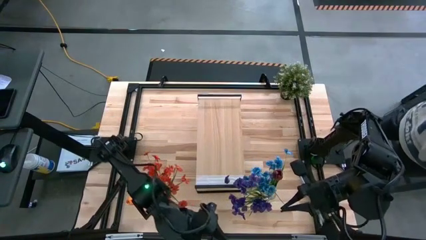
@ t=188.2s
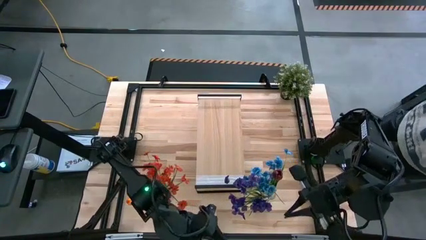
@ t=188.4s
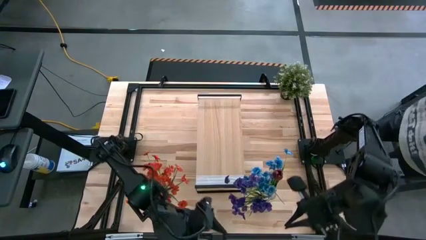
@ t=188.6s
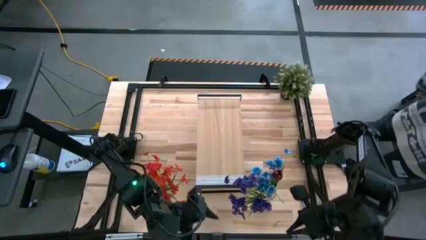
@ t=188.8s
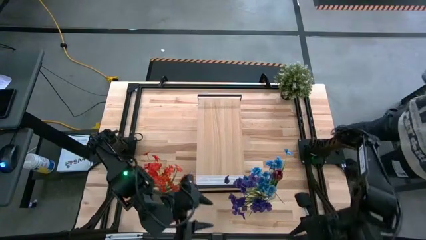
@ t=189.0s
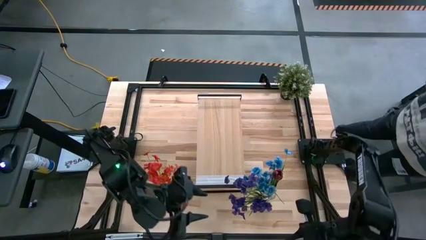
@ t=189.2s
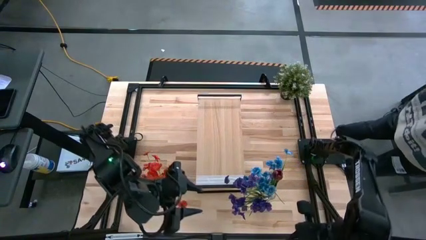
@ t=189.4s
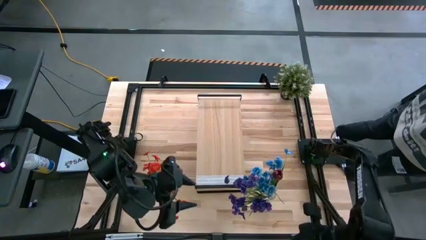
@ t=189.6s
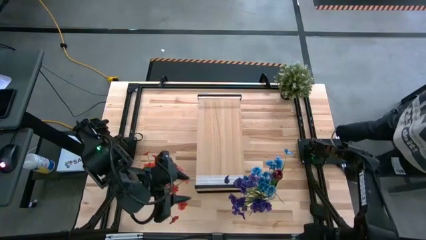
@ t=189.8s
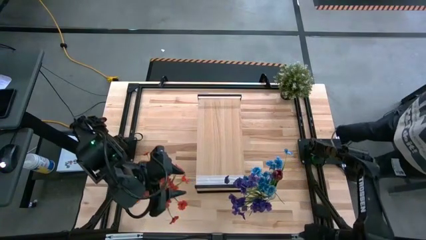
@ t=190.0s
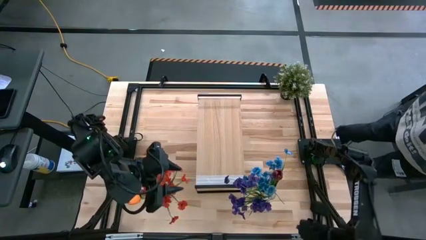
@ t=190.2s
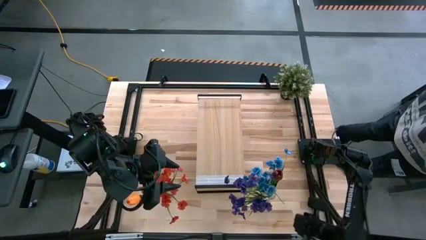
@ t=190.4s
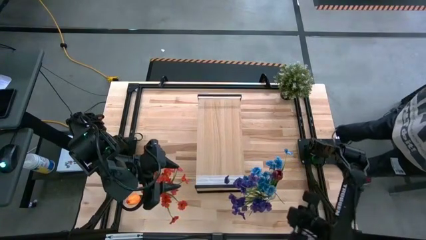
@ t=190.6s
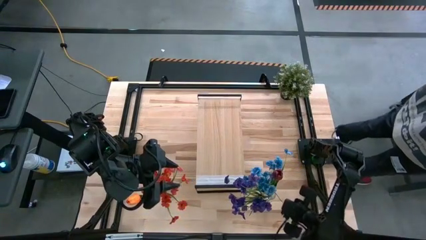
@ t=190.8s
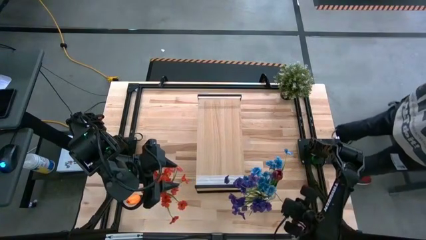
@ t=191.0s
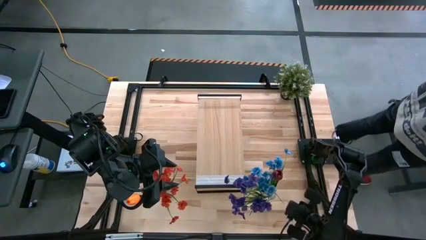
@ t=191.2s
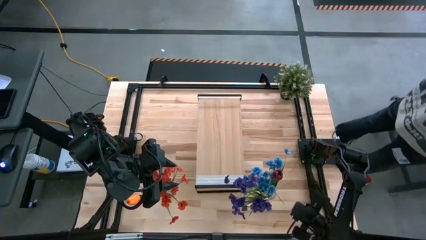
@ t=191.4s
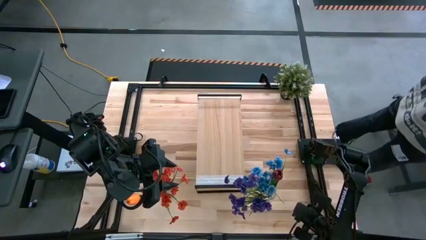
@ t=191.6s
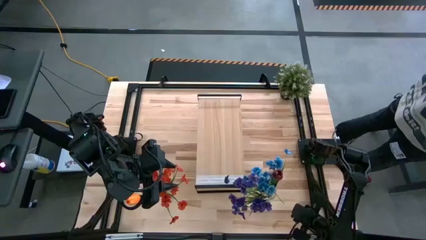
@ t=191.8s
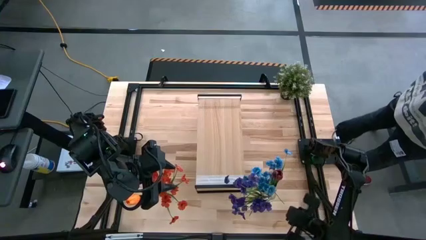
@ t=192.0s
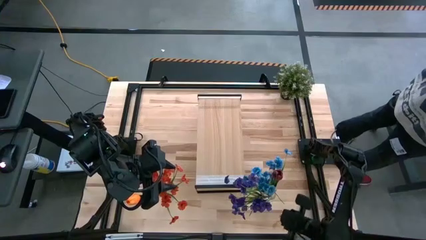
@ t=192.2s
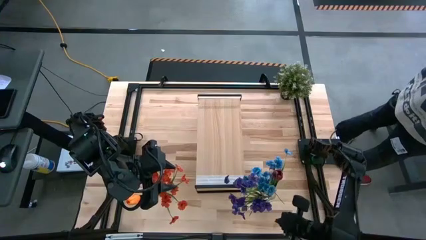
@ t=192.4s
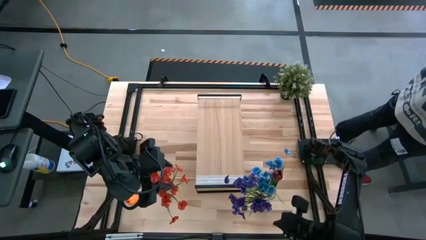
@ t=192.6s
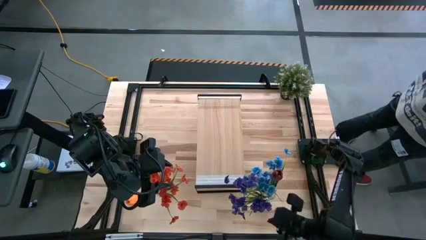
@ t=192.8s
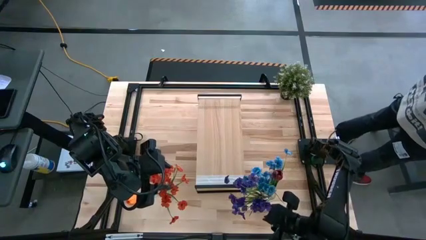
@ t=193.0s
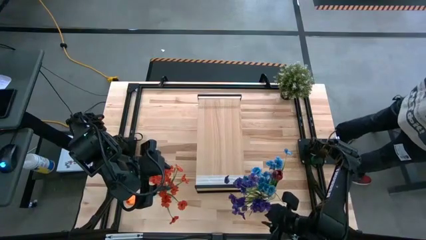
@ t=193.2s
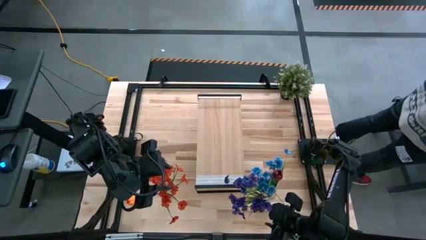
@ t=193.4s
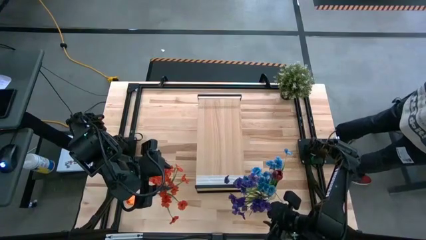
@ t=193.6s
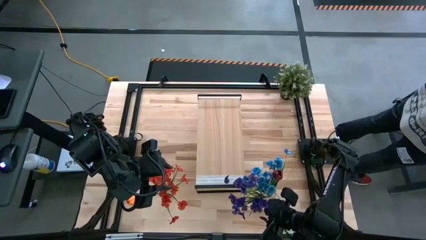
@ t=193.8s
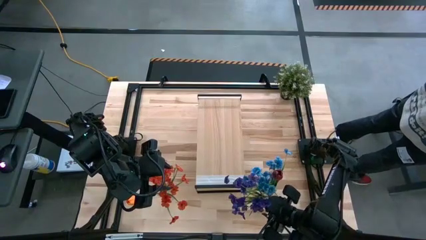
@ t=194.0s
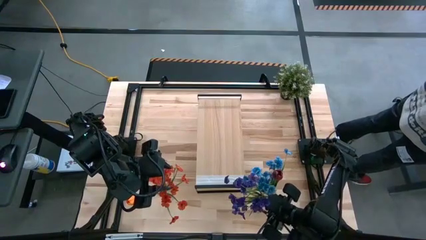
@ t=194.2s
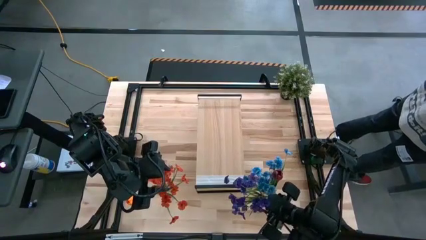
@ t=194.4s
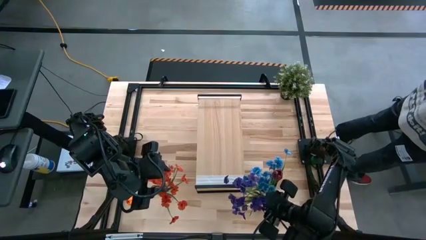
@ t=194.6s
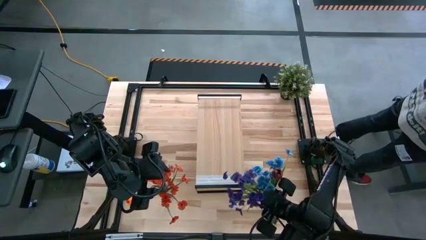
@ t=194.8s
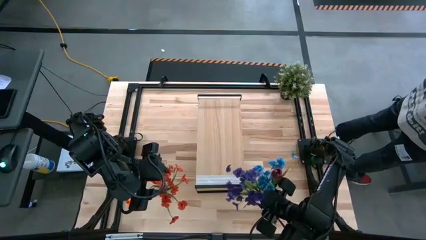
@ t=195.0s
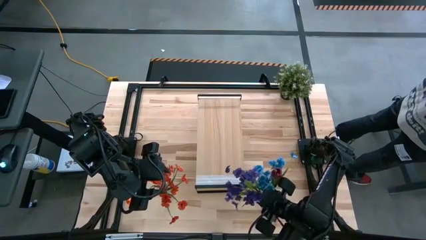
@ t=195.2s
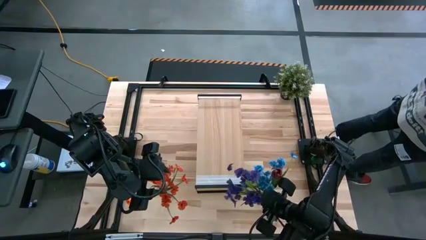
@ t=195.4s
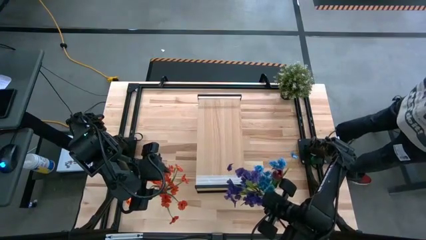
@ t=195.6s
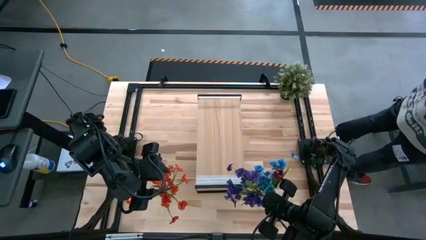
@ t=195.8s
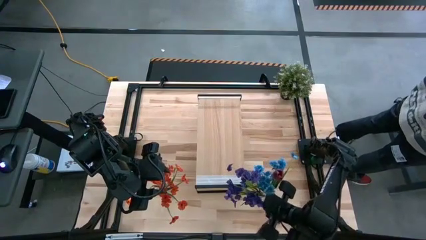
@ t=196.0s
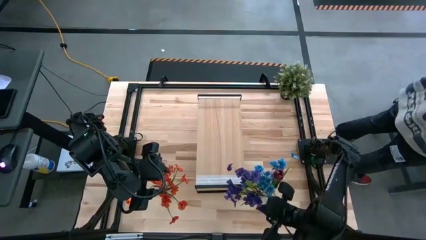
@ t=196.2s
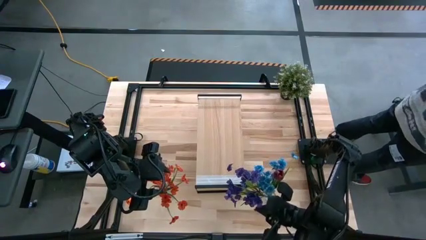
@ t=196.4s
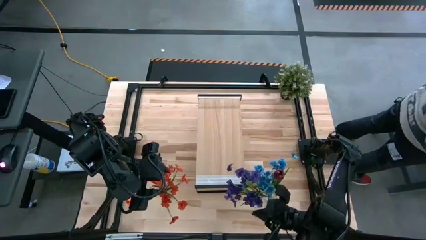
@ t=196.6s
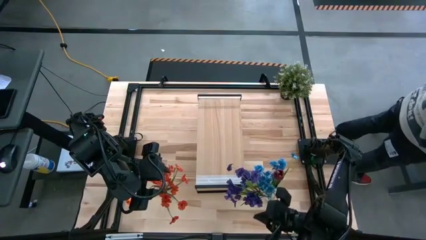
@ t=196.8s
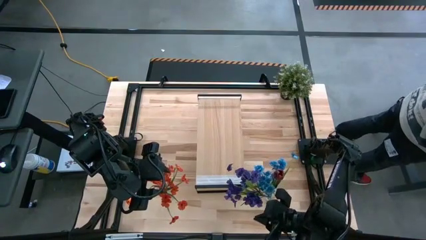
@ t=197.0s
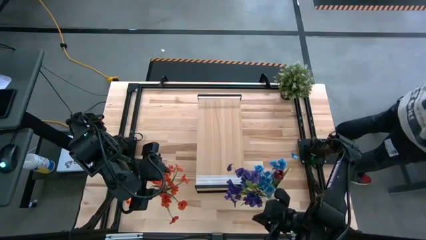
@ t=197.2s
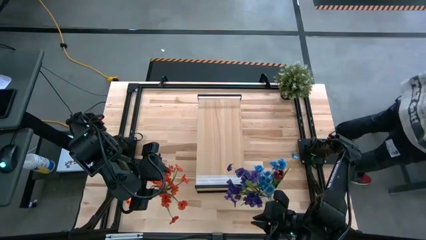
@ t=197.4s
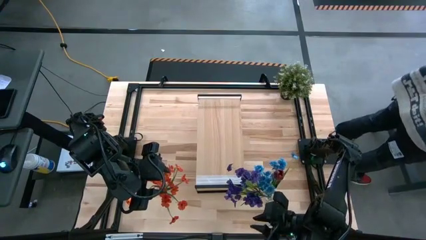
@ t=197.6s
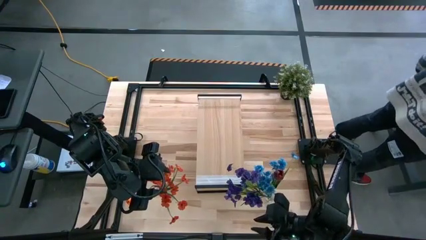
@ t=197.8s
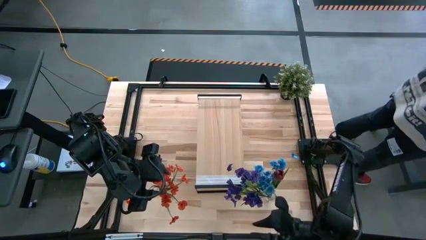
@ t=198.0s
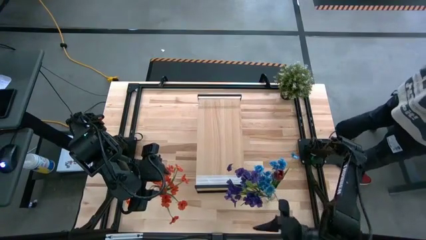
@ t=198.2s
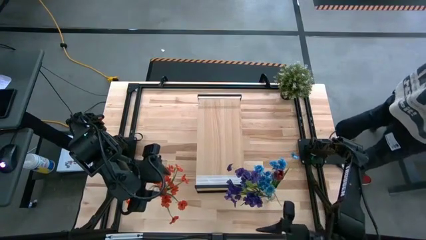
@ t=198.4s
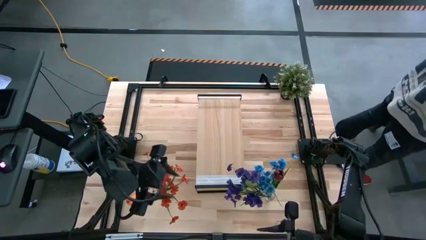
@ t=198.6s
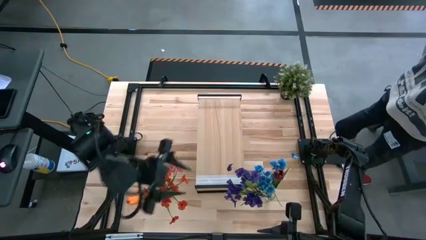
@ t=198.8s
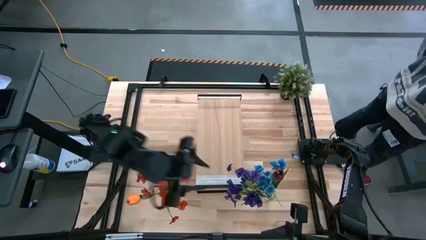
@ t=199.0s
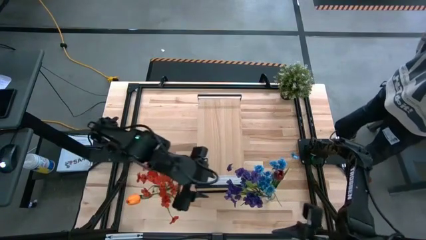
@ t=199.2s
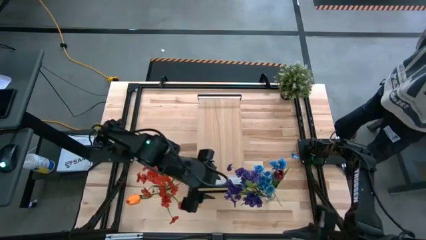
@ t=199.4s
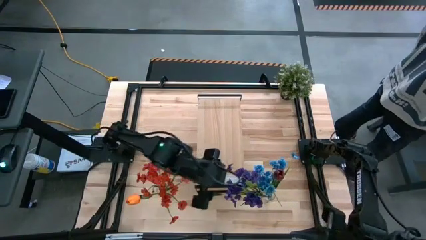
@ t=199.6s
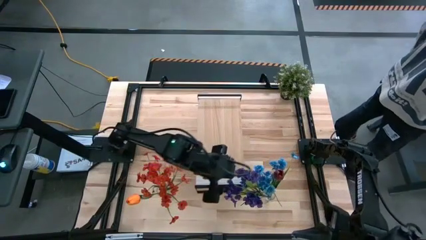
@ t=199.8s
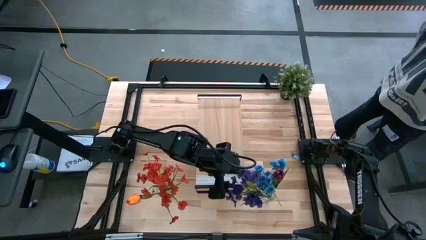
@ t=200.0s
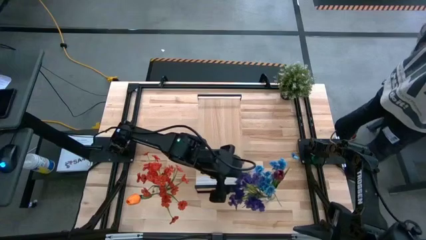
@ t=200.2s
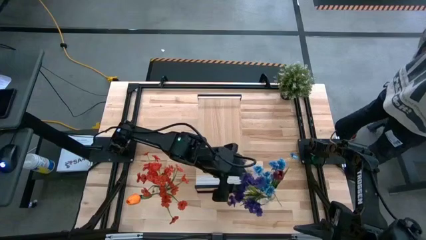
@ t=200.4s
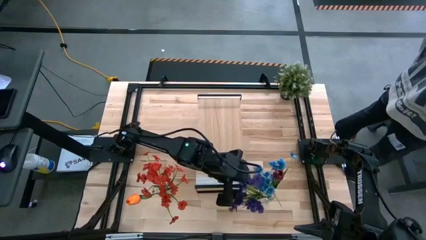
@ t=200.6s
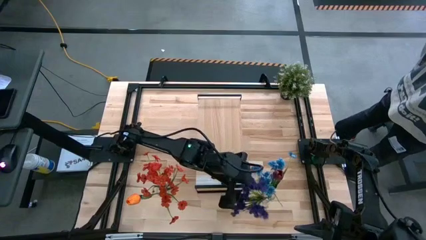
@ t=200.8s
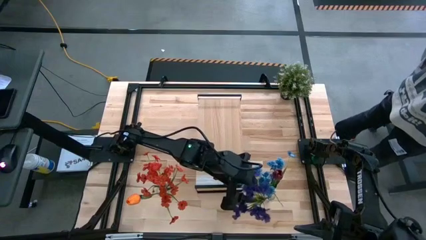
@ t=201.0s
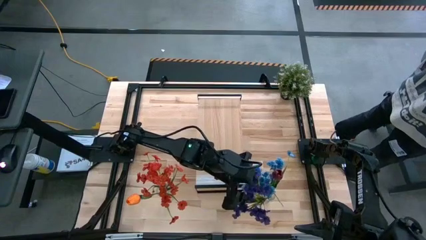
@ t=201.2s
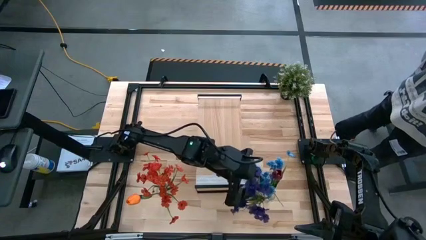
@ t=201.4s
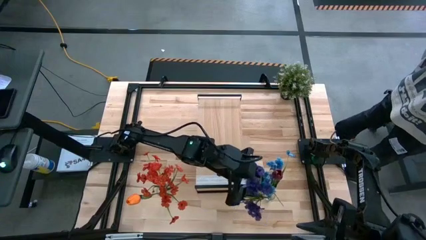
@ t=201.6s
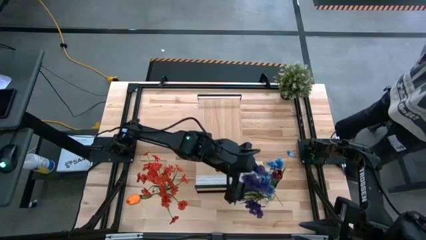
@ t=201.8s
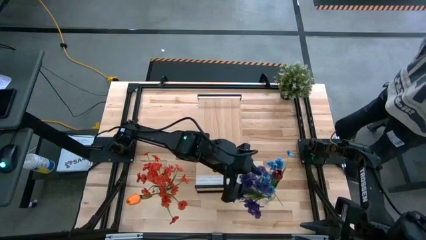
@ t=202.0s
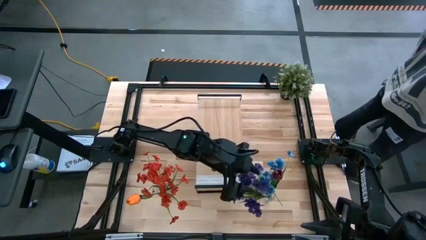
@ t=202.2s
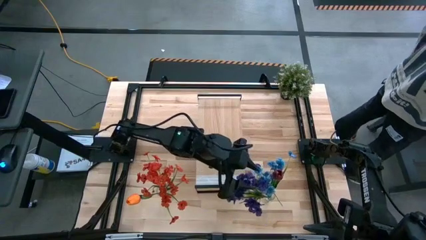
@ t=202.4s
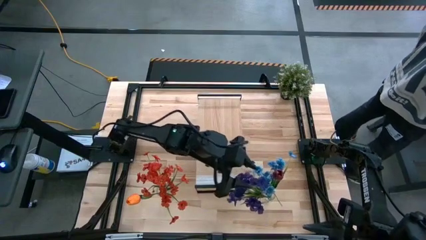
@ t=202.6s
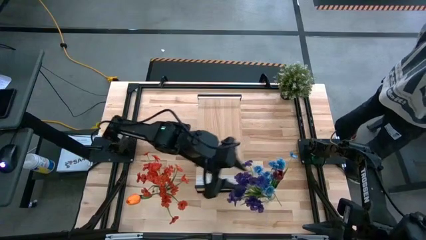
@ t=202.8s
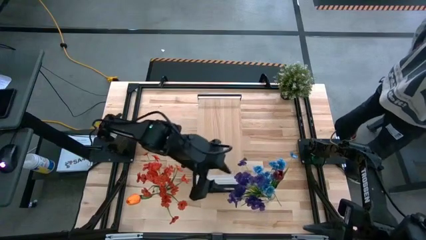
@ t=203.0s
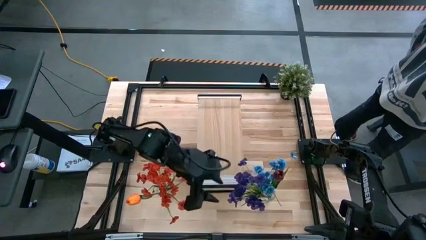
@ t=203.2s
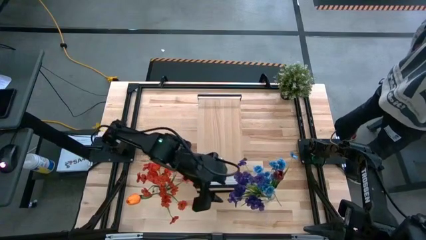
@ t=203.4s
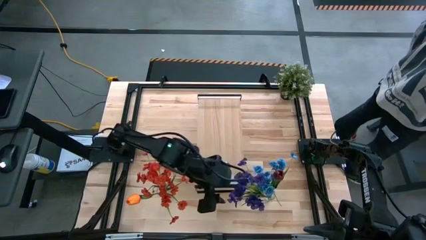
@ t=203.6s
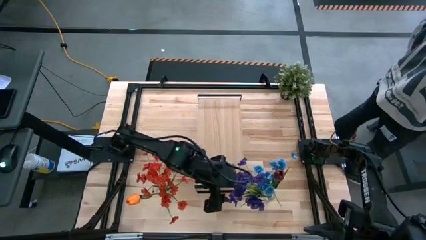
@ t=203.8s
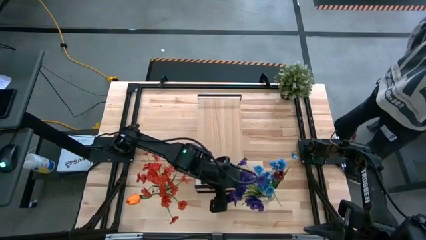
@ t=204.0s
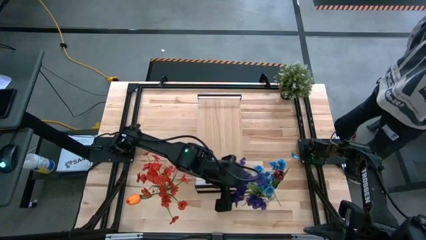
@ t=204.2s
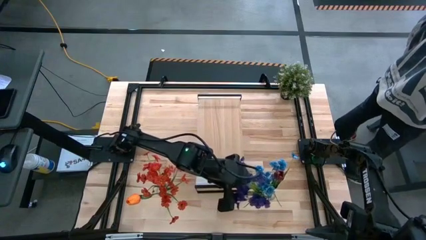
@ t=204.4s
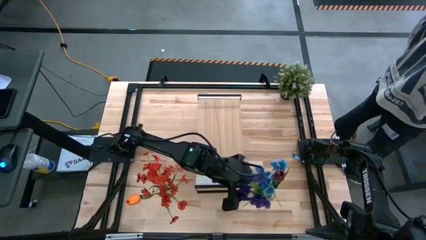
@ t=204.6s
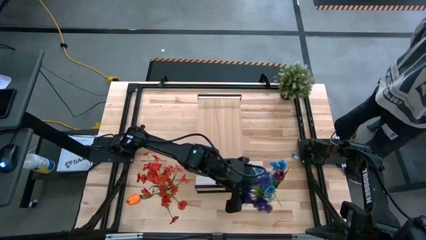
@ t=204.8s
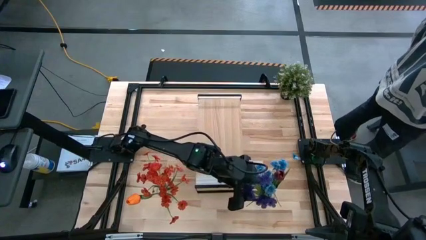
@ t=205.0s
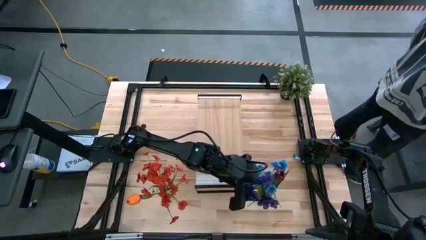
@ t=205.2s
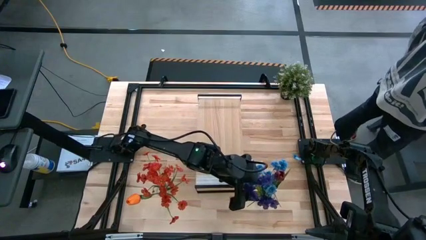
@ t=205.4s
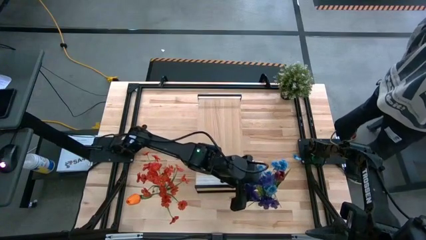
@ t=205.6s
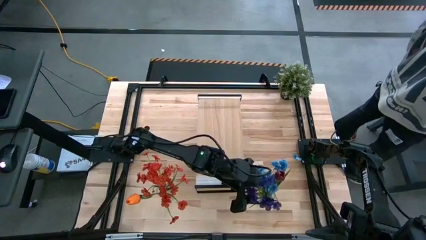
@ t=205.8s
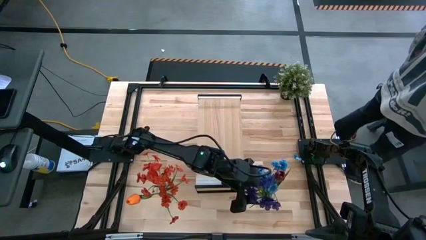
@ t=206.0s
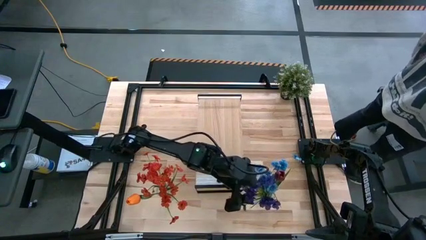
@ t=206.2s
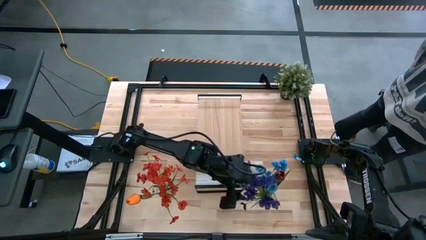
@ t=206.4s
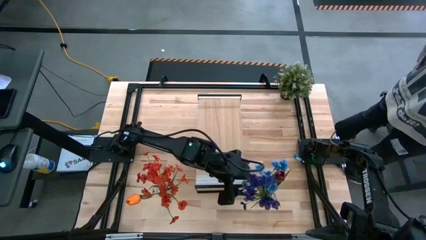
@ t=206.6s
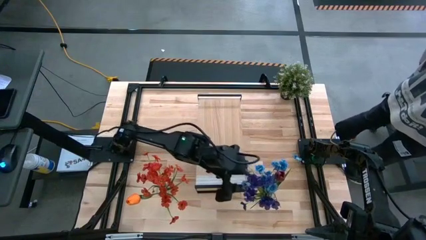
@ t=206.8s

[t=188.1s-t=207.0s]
Task: Pick and place flowers into a vace then onto a shelf
Put the violet flowers into the right transparent vase
